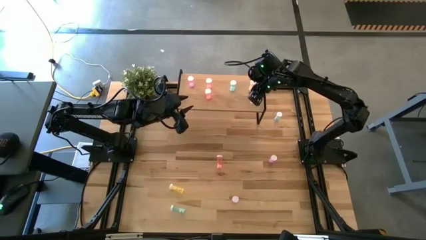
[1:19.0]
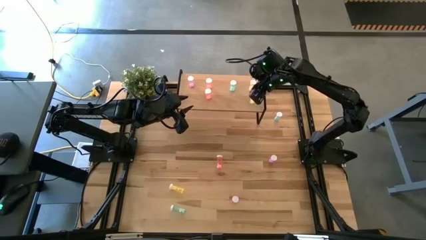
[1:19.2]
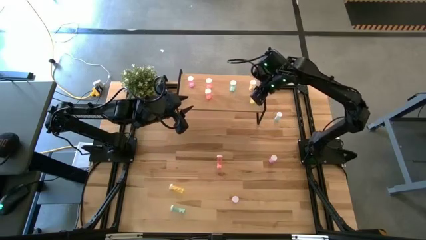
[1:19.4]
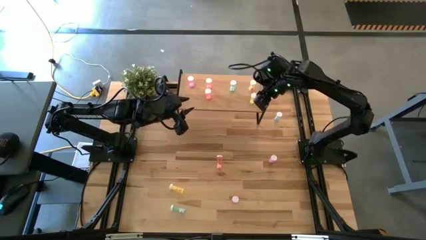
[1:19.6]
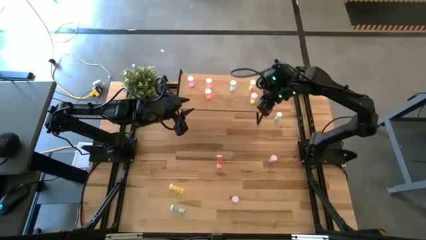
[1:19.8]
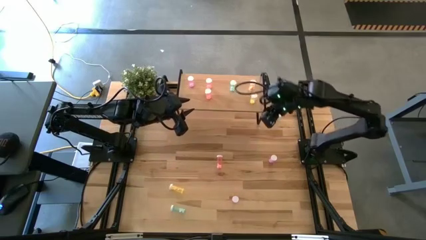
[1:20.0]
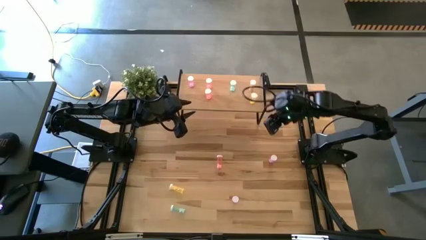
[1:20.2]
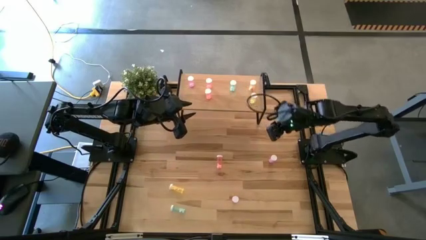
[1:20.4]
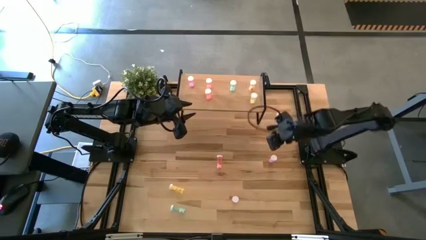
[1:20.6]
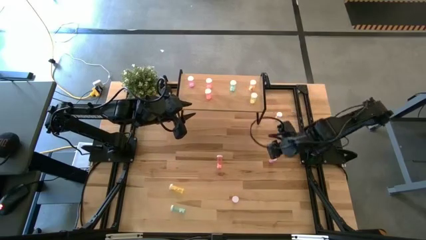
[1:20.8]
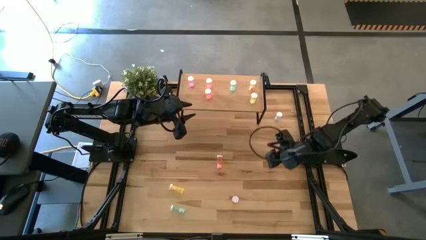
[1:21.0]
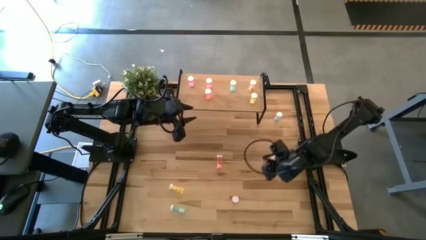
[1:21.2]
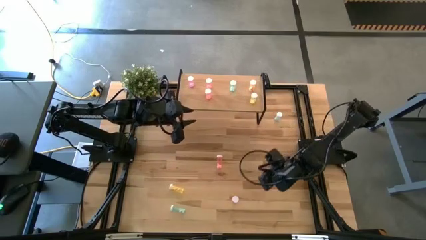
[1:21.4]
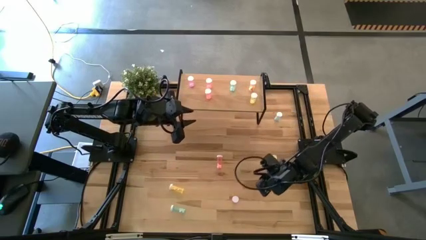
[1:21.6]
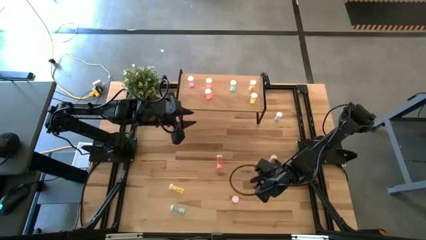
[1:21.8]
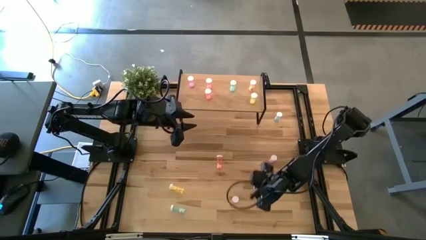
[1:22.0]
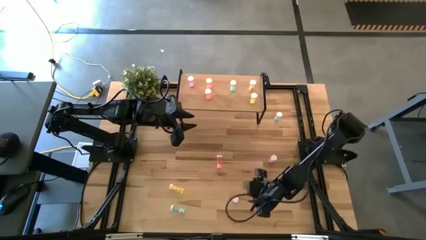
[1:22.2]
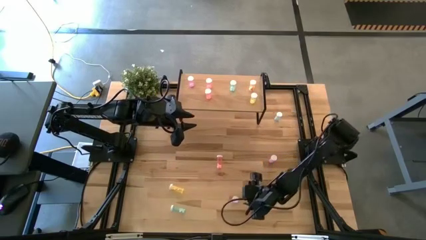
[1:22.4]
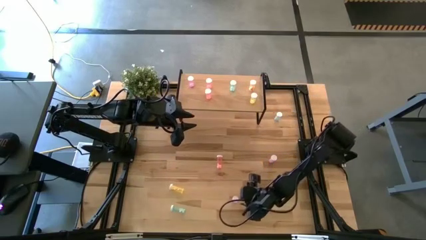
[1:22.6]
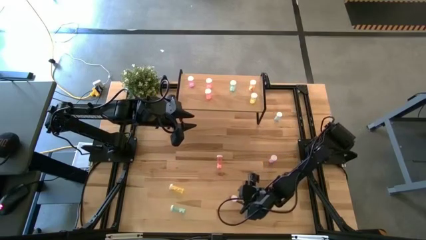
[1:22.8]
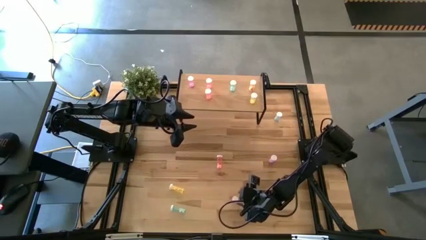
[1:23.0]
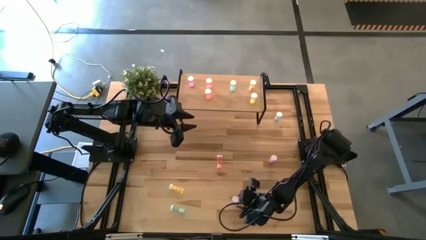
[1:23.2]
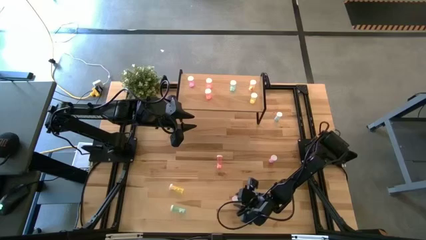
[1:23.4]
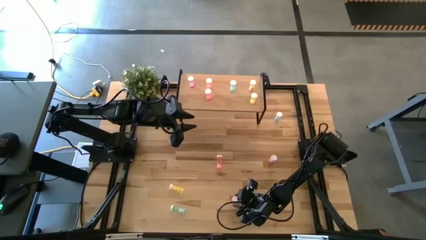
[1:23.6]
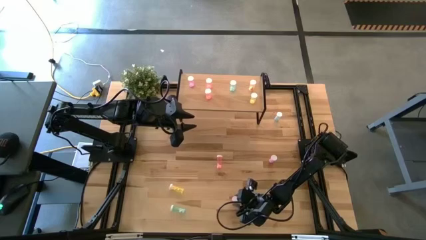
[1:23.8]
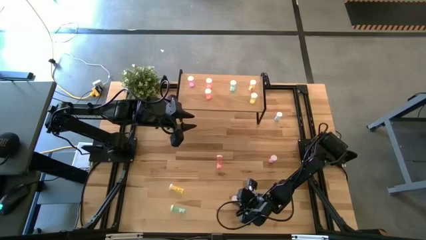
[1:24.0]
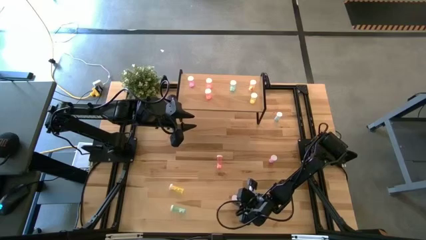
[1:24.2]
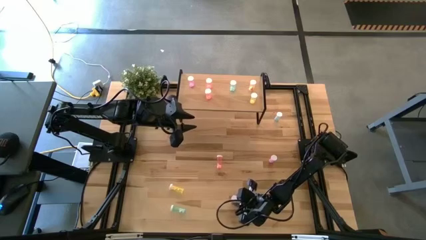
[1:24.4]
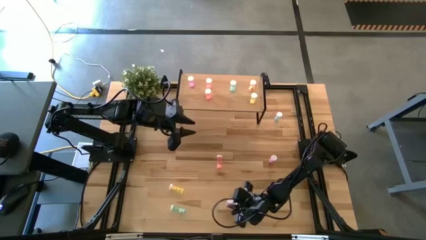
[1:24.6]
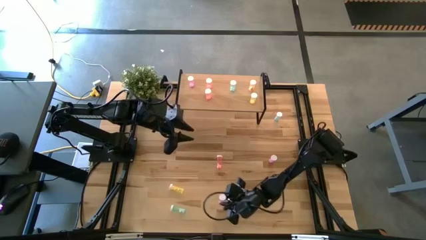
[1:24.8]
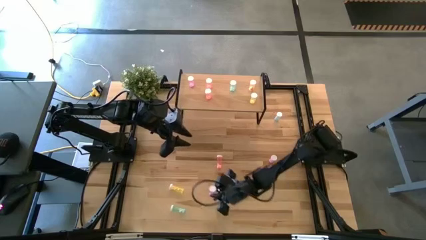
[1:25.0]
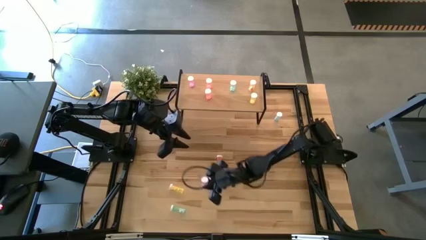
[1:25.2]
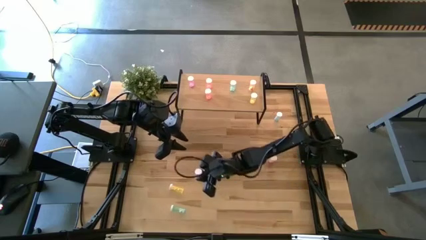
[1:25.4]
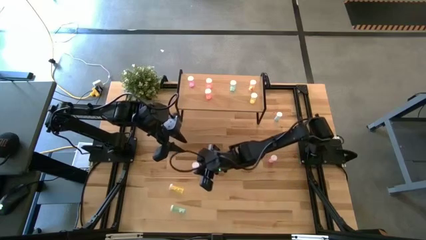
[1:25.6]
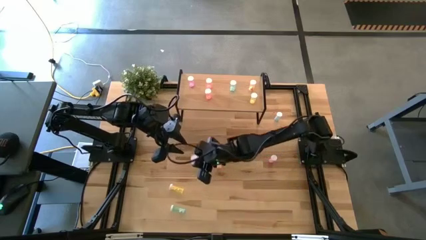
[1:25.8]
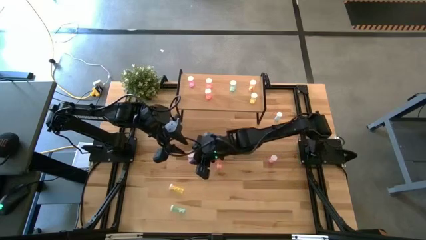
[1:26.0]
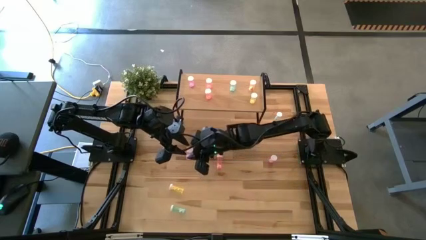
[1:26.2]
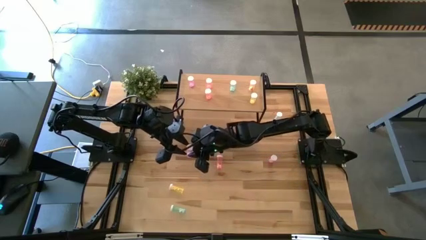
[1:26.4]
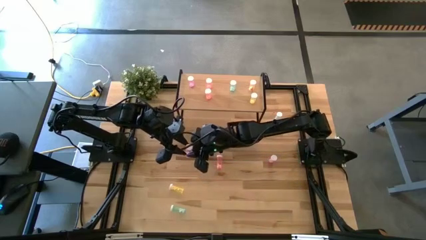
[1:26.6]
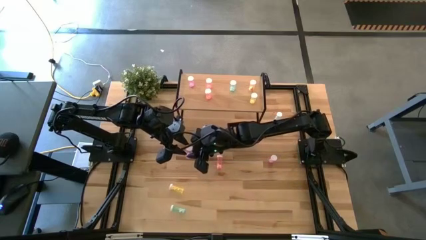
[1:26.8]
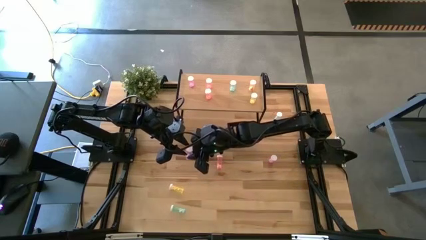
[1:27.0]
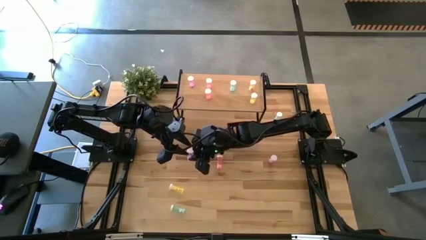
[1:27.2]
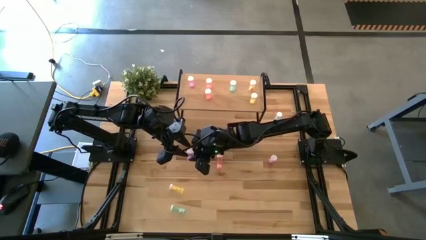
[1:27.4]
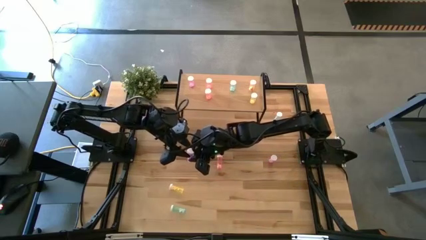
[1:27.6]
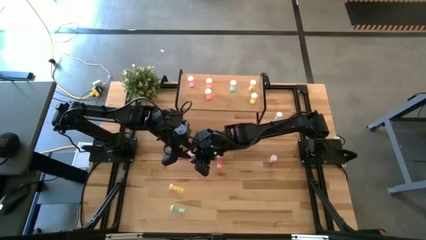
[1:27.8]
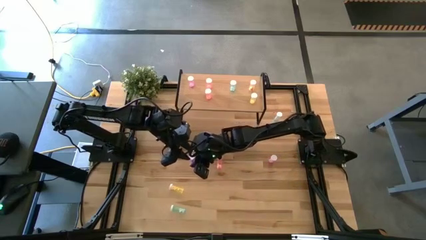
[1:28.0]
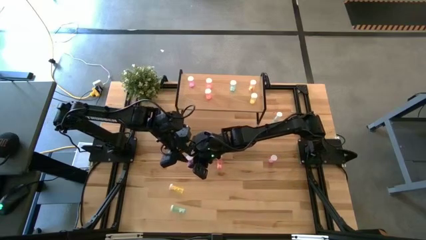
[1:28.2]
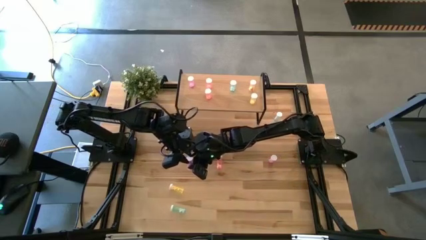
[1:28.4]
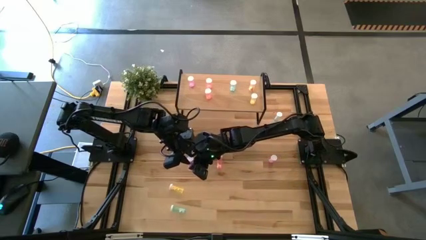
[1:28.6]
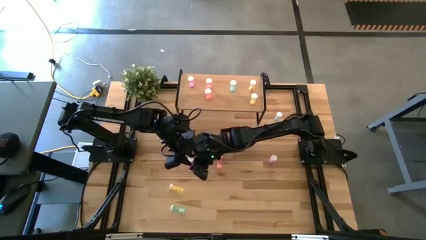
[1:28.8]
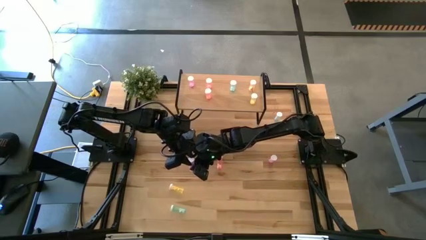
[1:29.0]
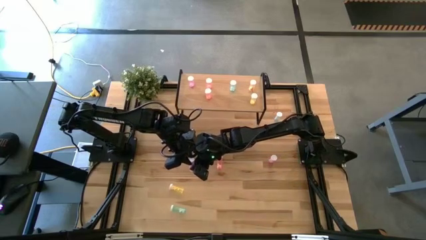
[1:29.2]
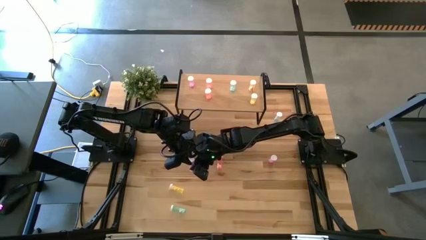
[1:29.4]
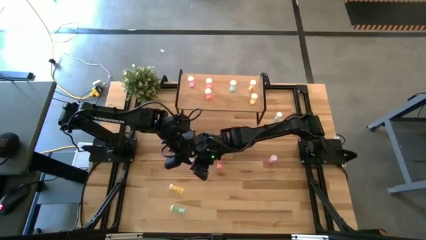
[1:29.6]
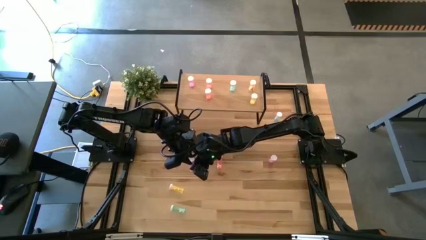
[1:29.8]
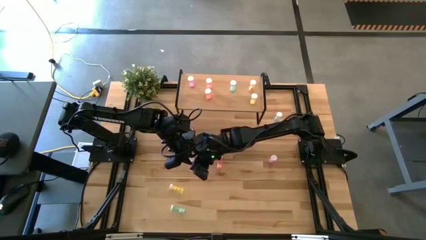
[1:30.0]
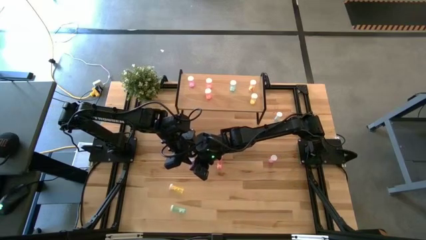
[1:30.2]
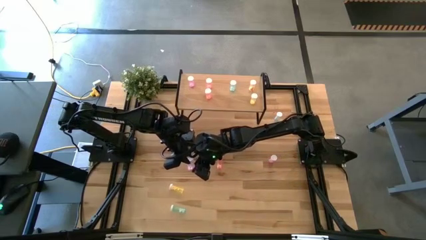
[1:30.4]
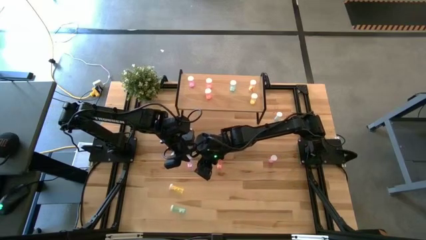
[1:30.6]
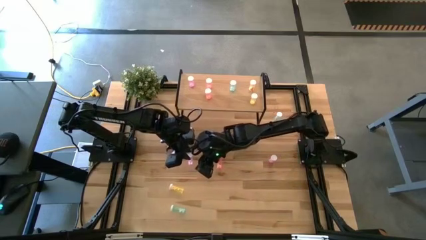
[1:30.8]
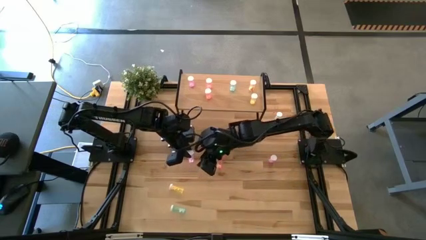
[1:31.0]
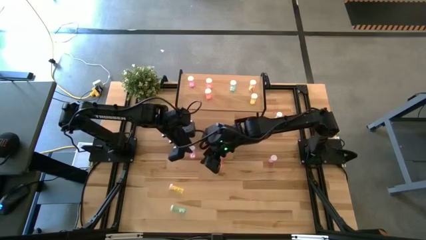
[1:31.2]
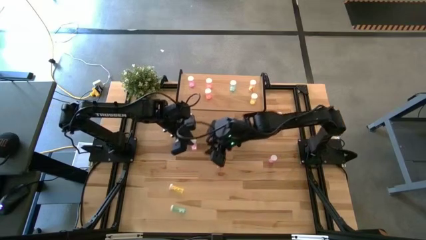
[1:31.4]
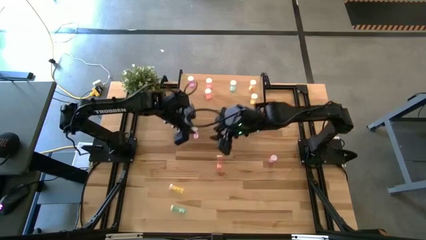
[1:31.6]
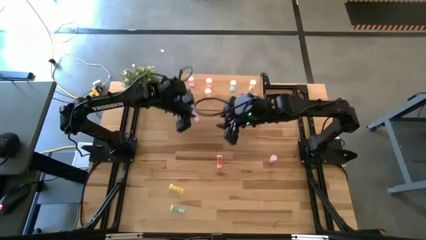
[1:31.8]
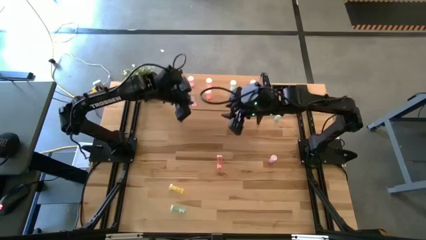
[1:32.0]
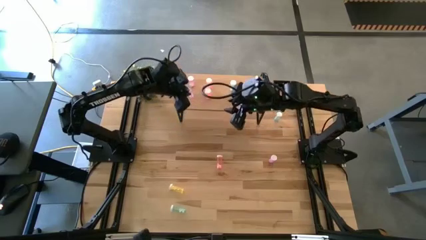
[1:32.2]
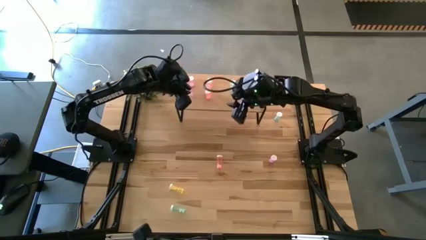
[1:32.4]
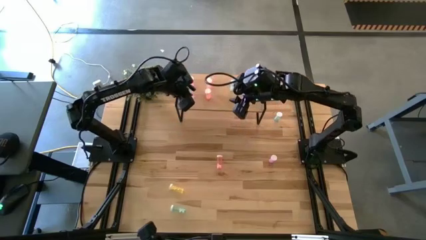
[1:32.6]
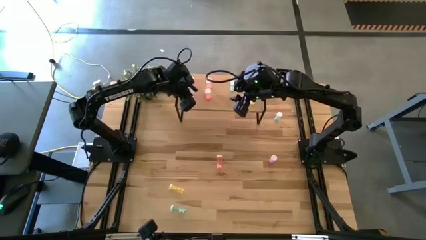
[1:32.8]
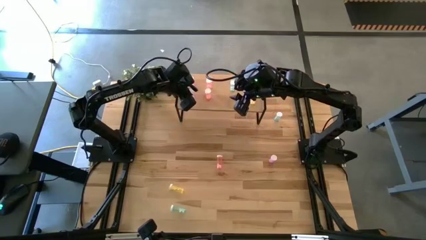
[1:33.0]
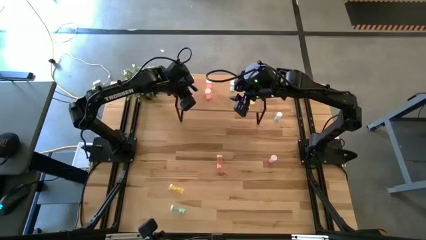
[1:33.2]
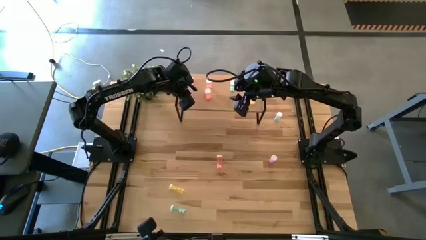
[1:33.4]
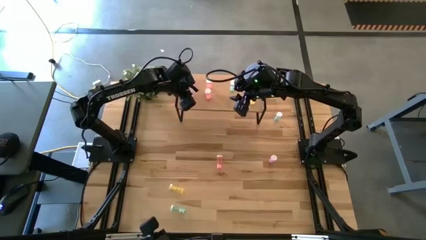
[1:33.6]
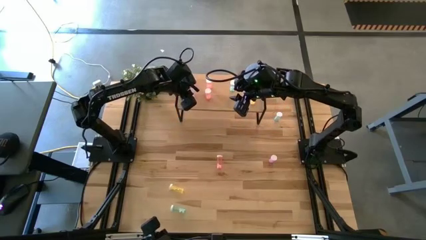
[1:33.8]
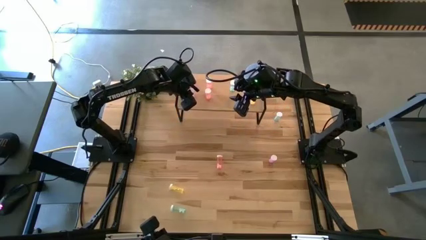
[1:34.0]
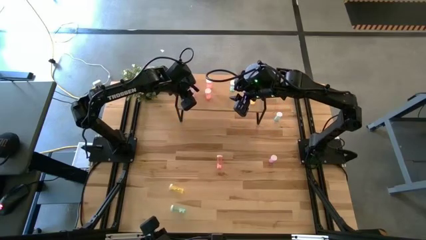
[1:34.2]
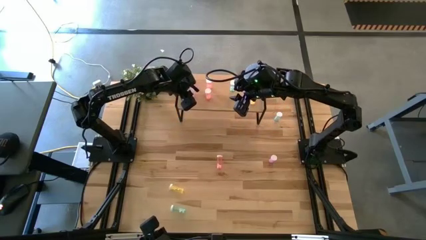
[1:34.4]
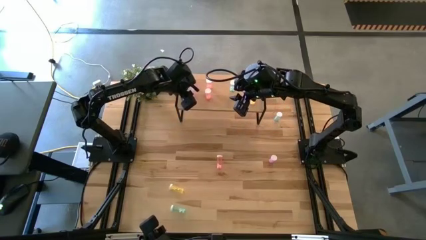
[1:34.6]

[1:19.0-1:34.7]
Task: Pick and place medicine bottles onto shelf by color
Put the bottom purple pill bottle on the shelf aligned with the other purple pill bottle
